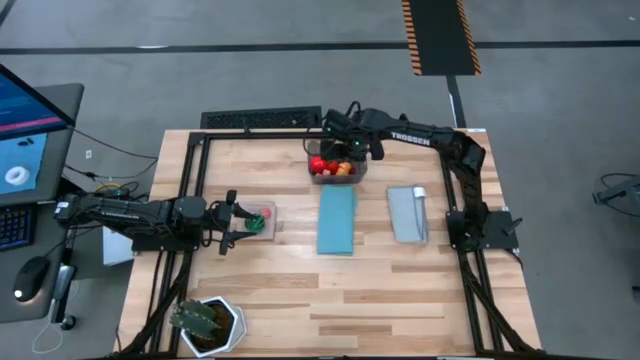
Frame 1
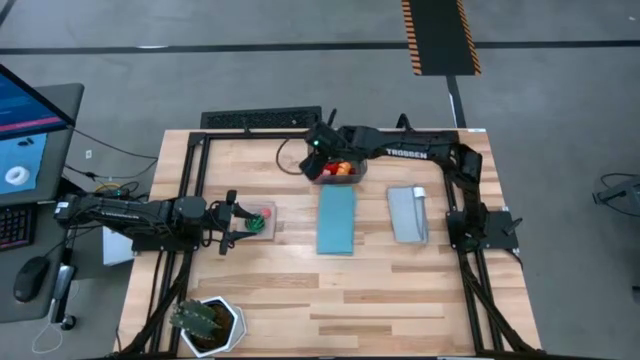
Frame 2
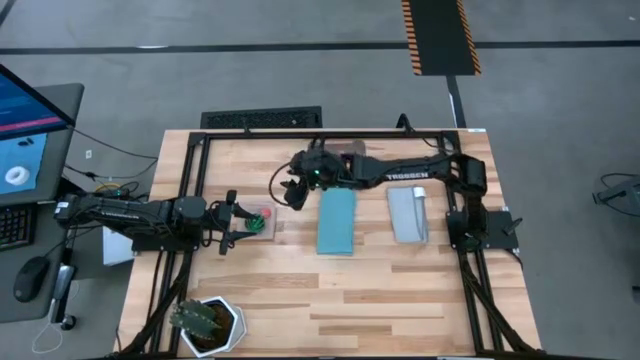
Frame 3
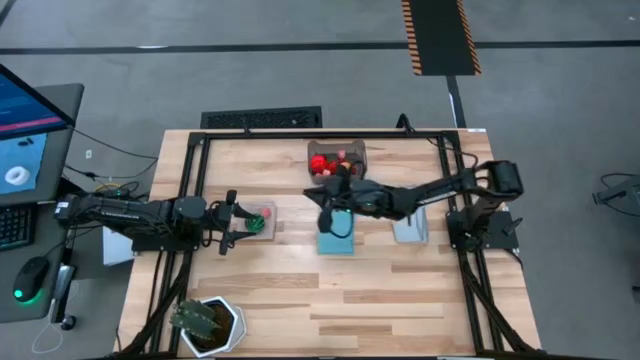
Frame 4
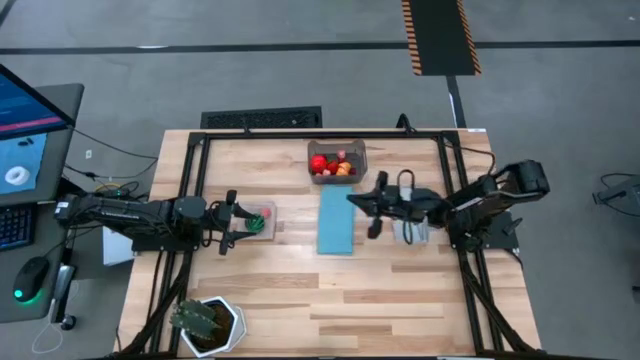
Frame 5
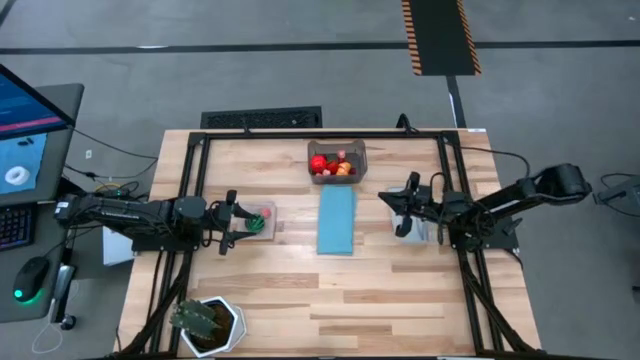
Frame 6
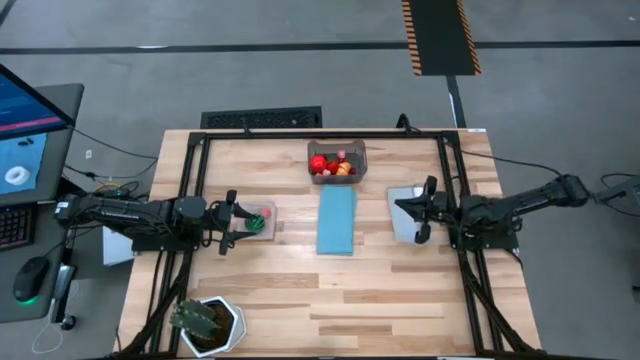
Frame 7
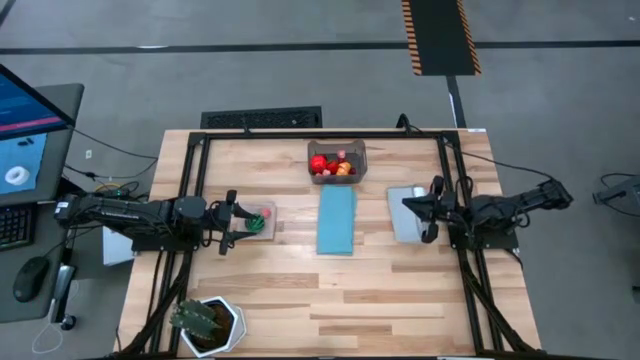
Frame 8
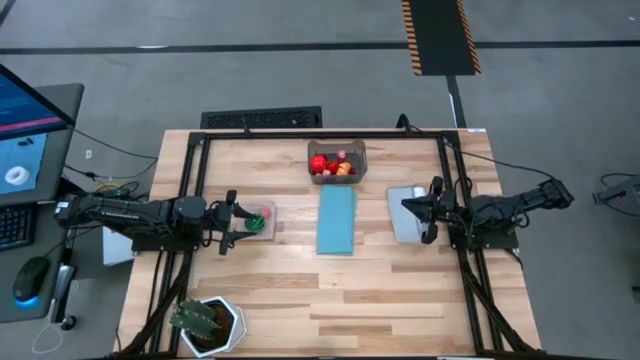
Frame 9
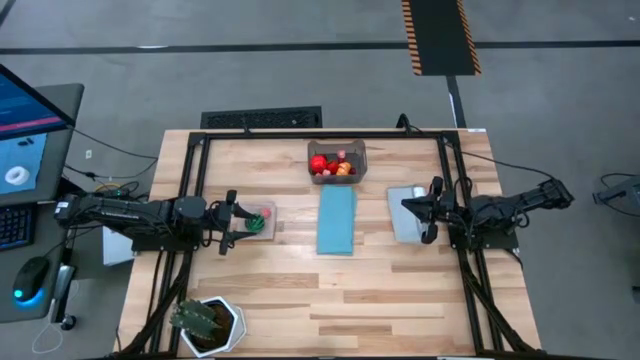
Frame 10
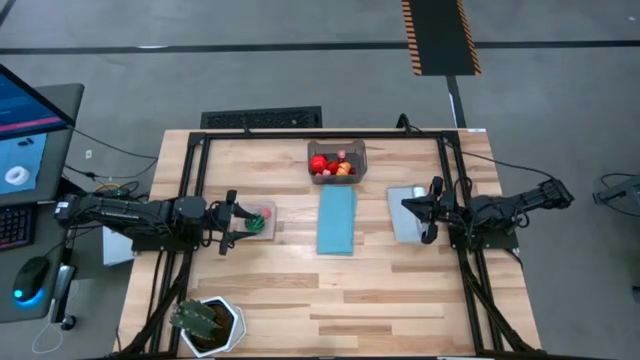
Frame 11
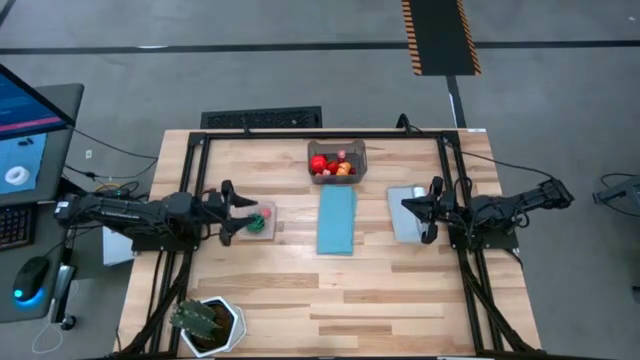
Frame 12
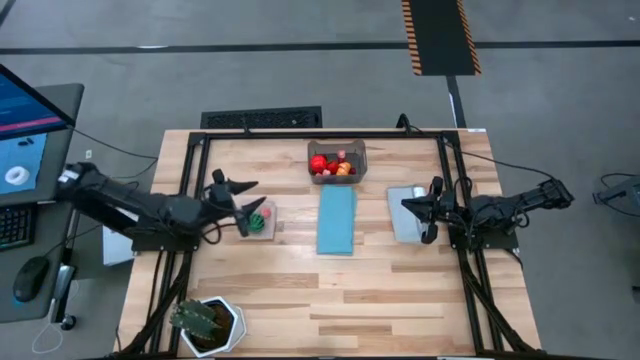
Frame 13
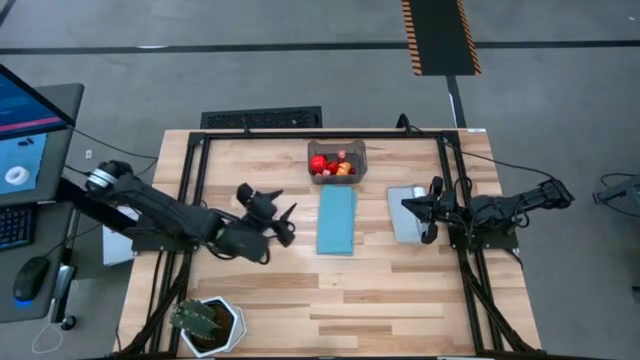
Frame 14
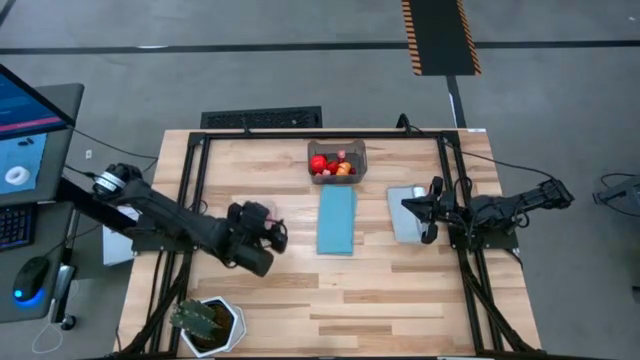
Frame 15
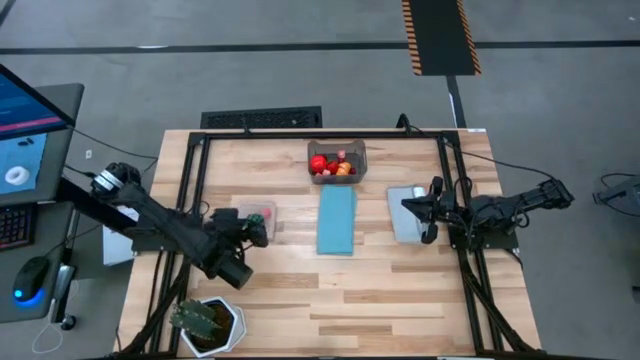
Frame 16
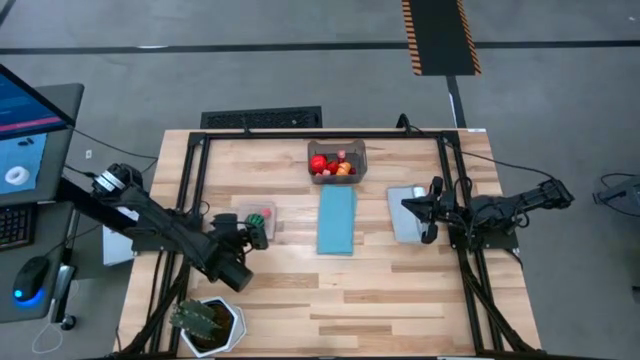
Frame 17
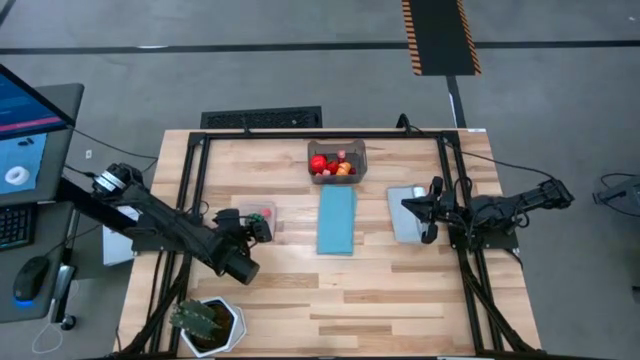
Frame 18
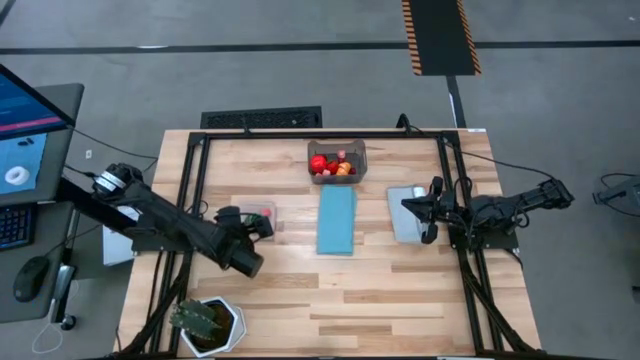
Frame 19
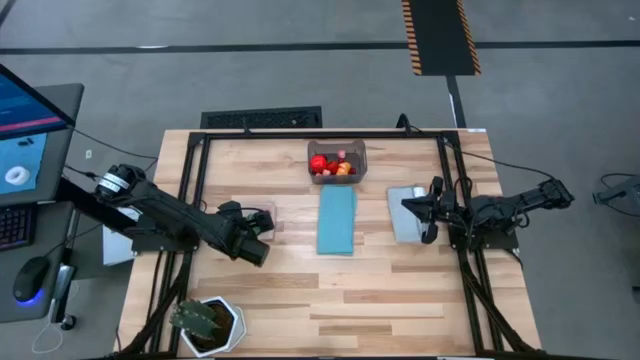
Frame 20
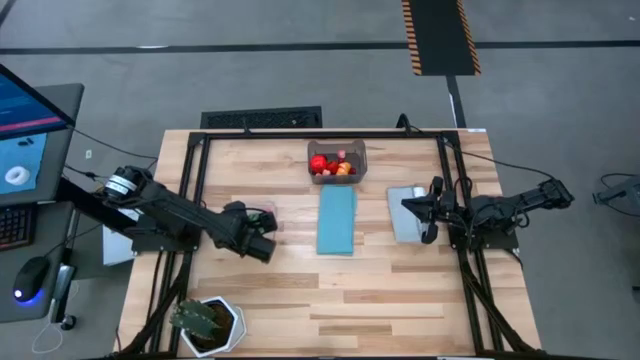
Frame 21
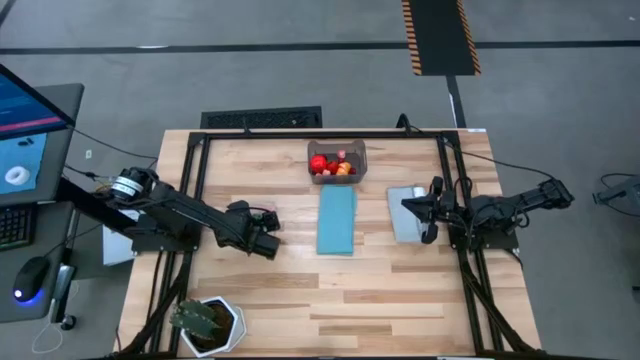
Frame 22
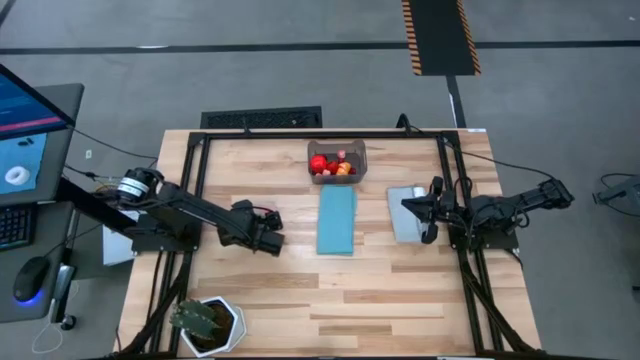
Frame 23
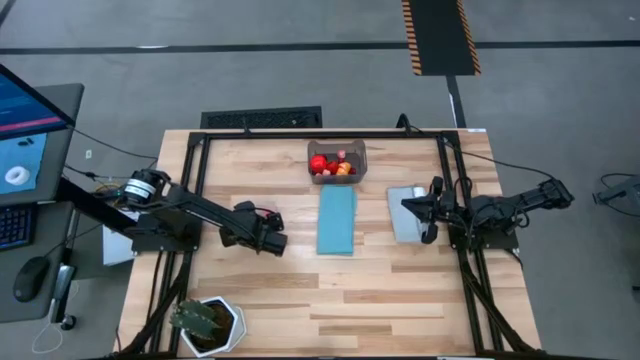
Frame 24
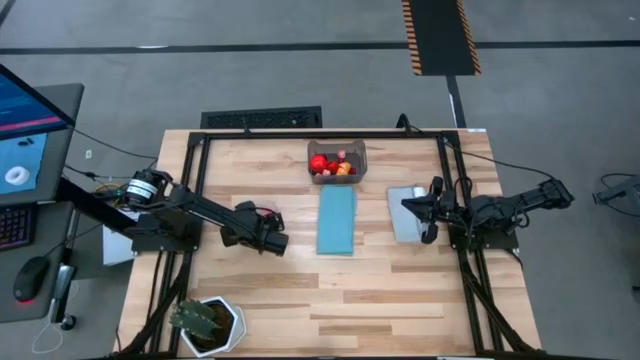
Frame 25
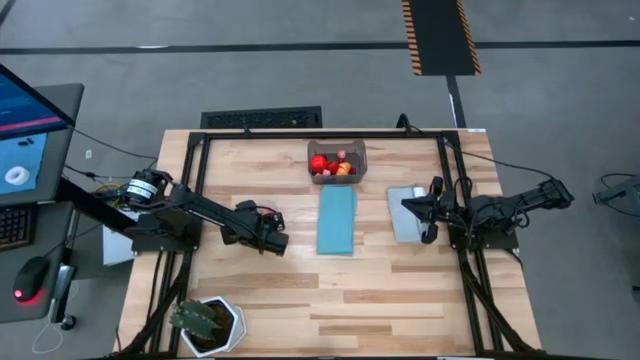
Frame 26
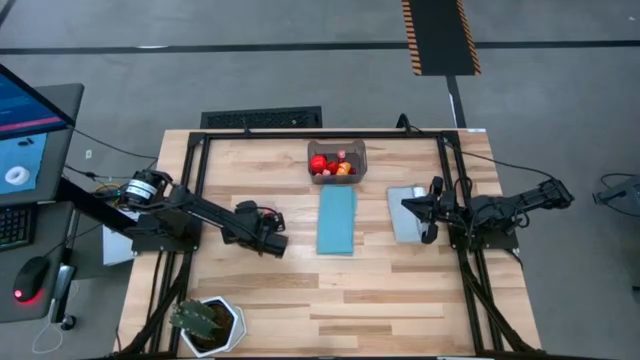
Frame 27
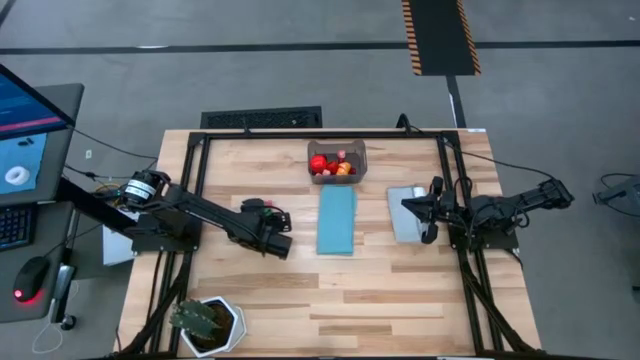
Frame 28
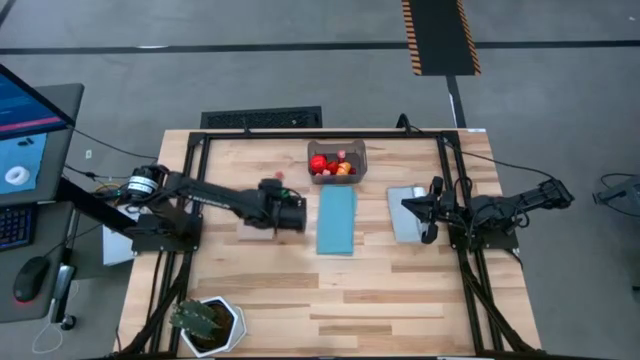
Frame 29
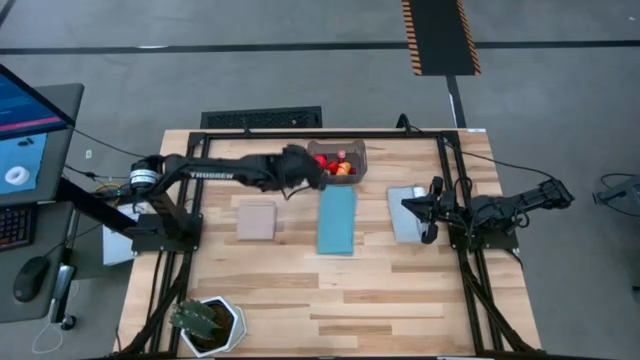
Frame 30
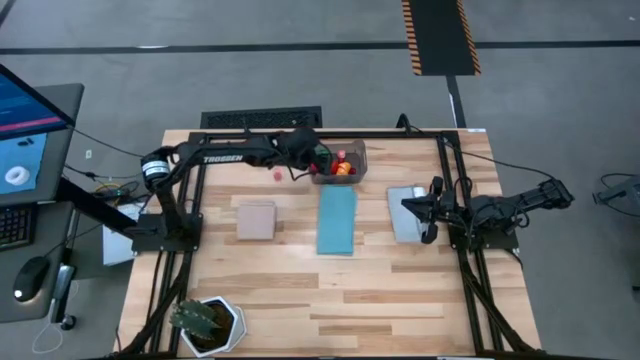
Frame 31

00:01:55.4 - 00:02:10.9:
Task: Pick and placing Produce into tupperware
Put the green watermelon into the gray bin

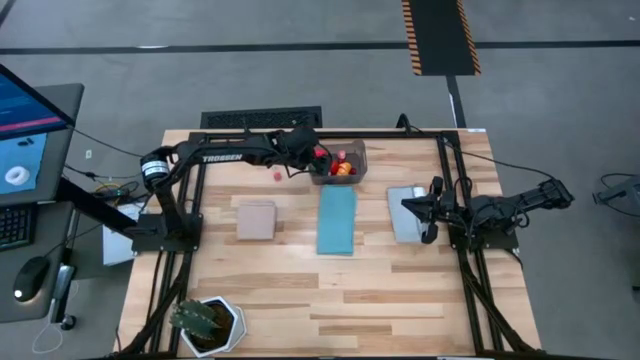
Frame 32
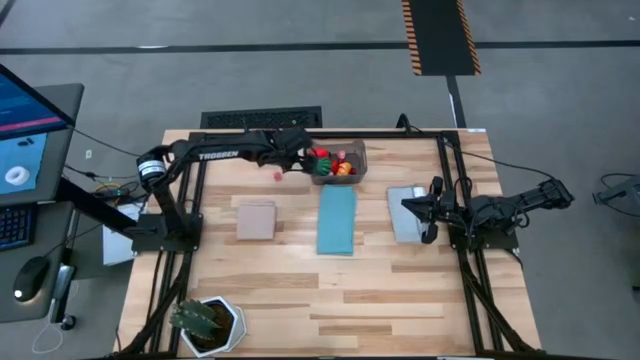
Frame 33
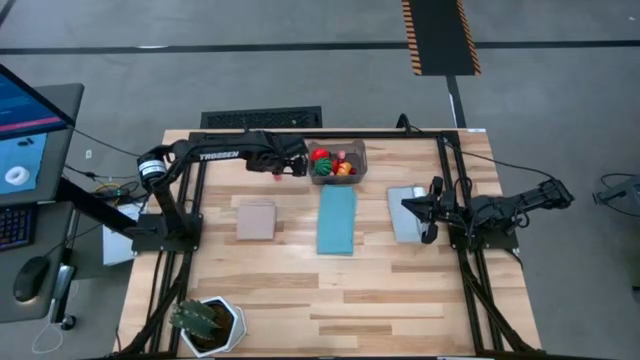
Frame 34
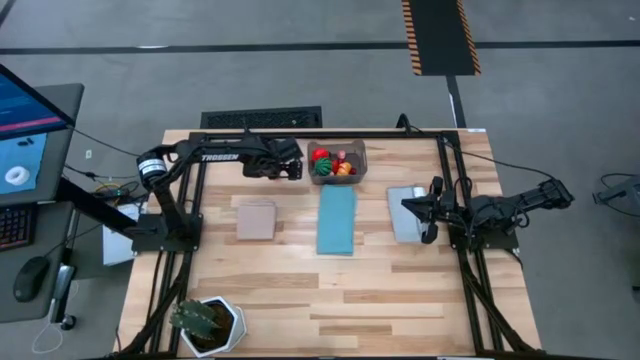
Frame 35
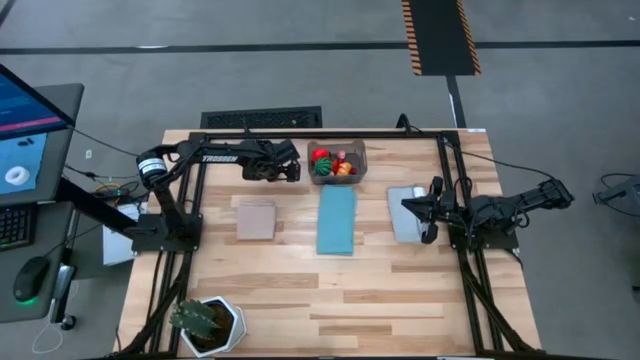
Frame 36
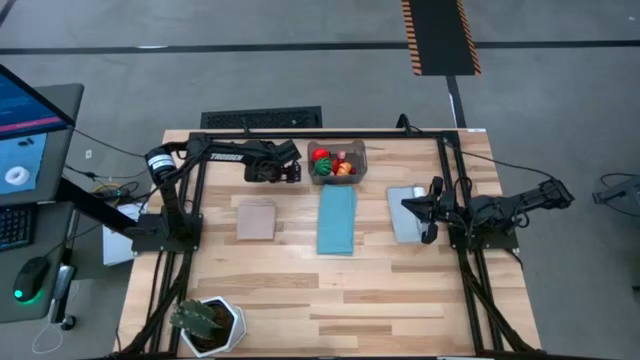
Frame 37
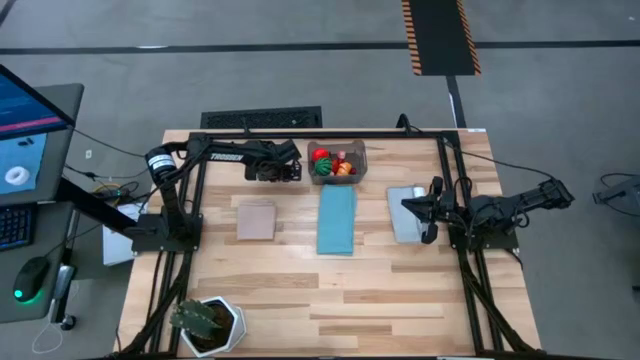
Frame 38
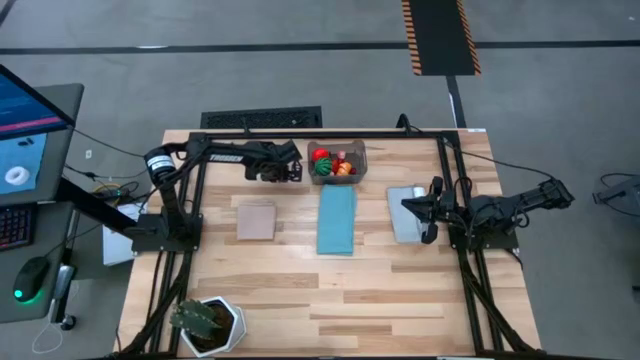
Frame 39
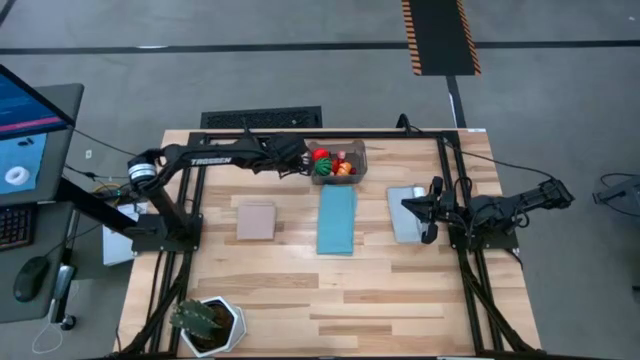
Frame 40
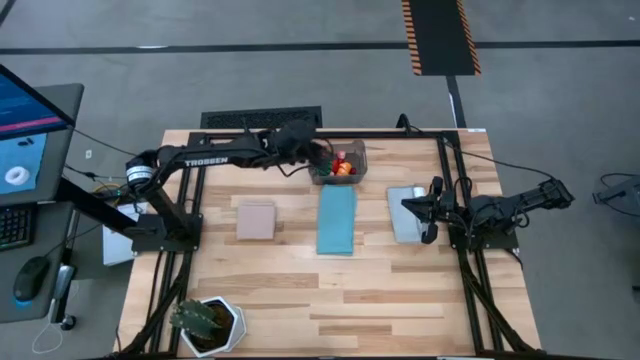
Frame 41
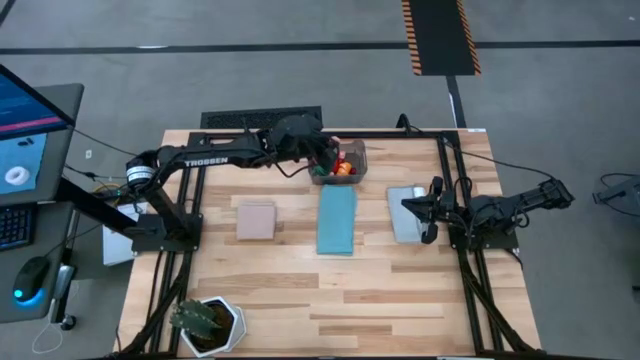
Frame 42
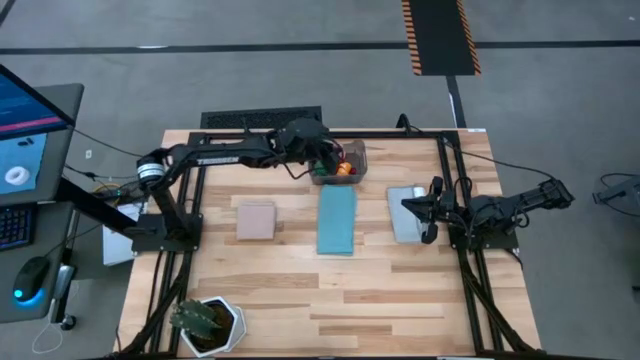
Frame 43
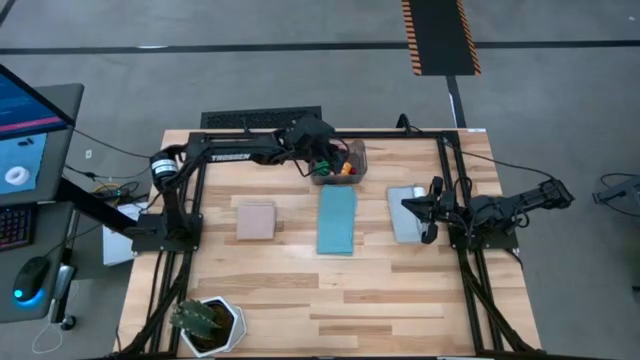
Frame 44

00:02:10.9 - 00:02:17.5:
Put the pink peach into the gray bin
